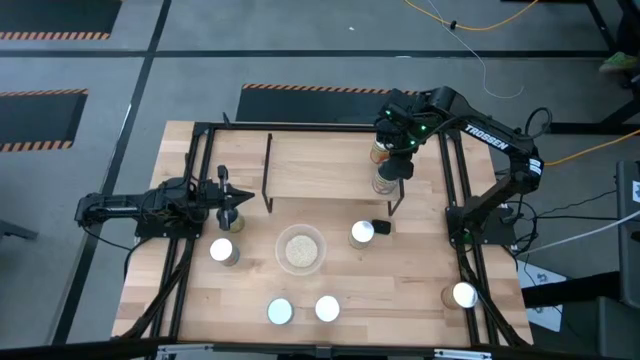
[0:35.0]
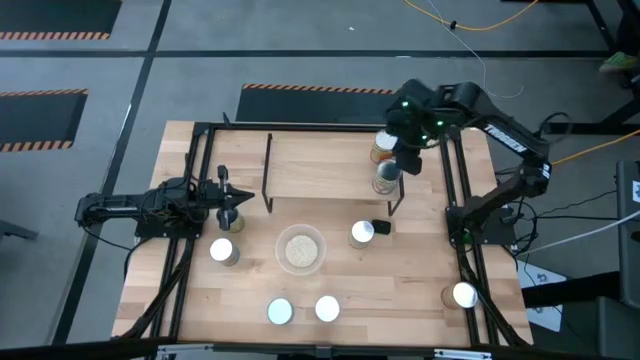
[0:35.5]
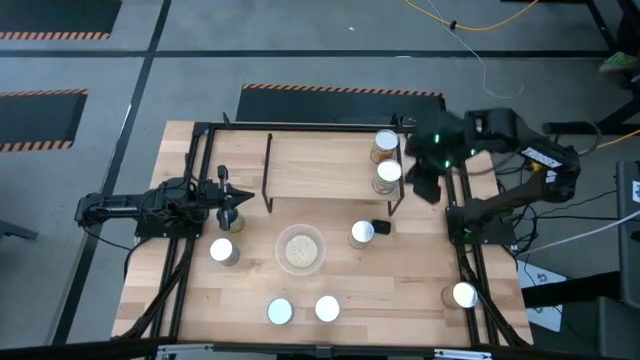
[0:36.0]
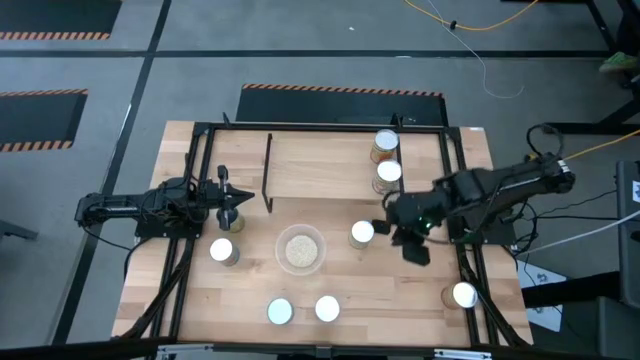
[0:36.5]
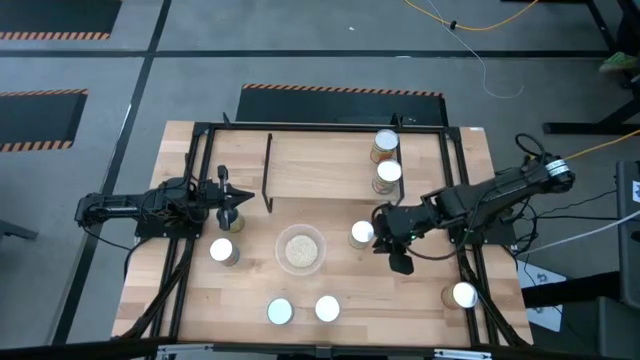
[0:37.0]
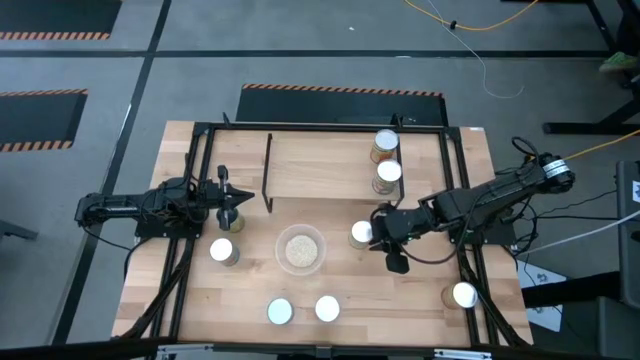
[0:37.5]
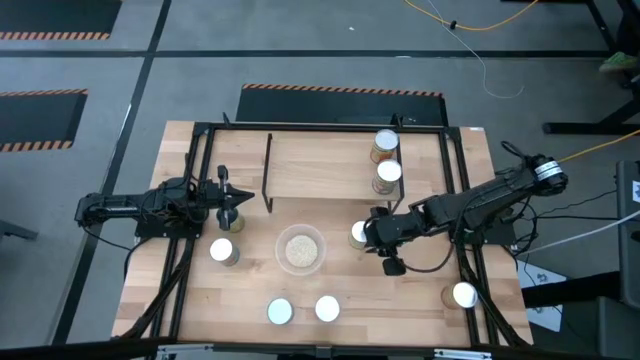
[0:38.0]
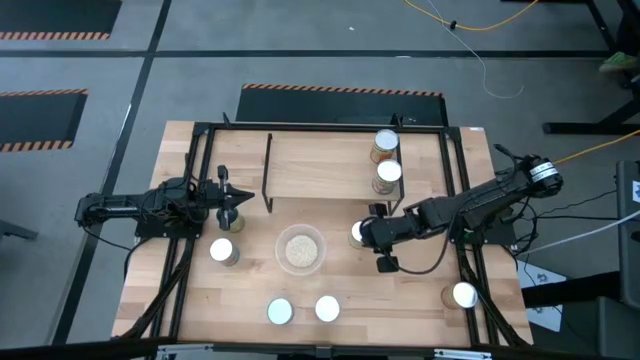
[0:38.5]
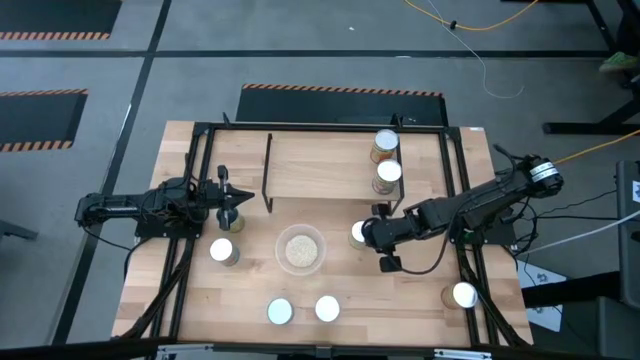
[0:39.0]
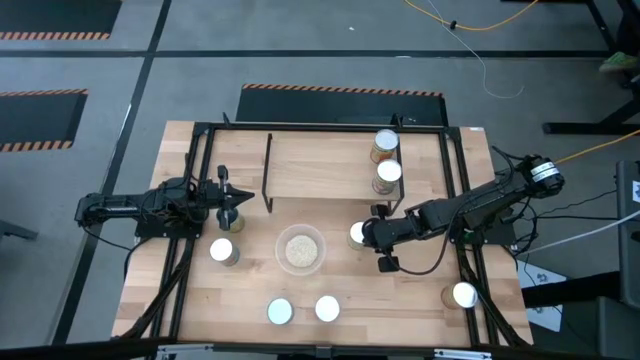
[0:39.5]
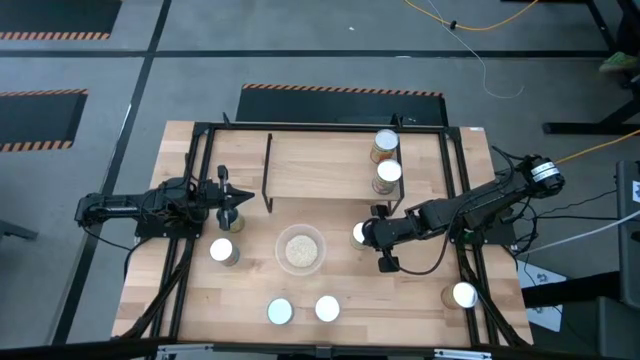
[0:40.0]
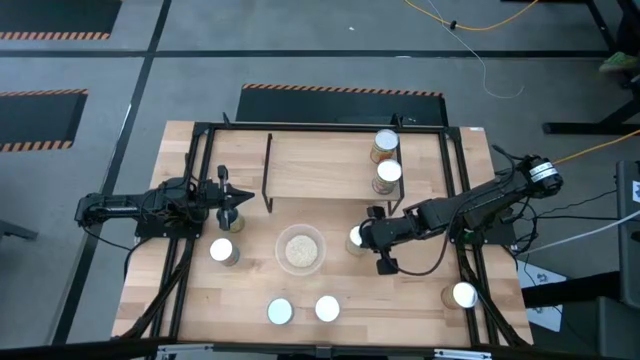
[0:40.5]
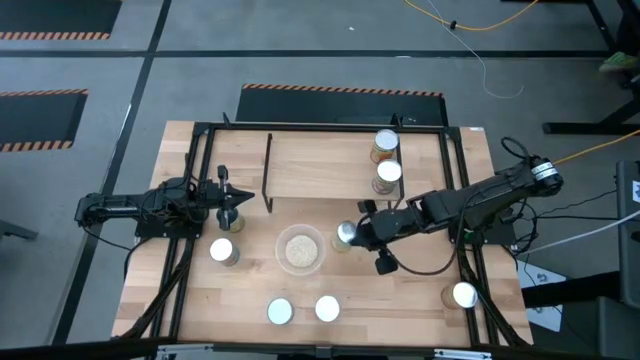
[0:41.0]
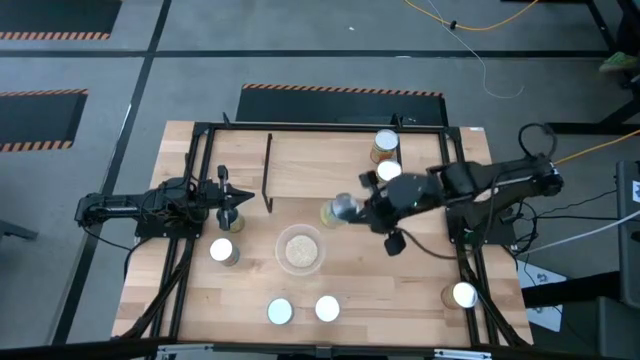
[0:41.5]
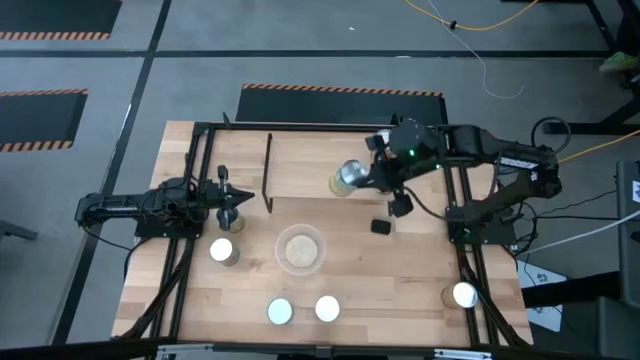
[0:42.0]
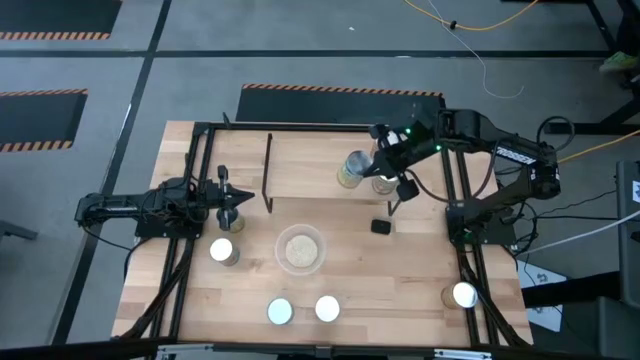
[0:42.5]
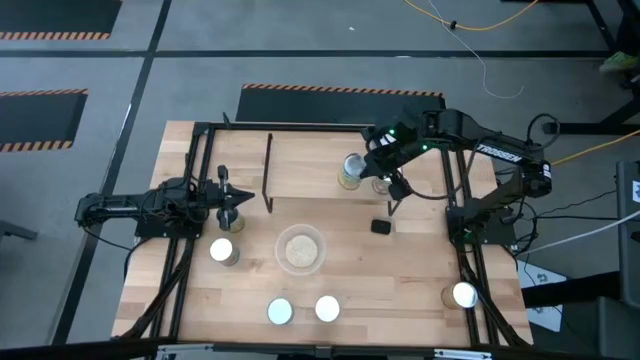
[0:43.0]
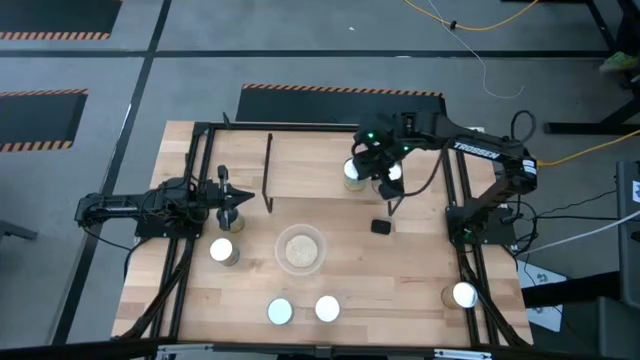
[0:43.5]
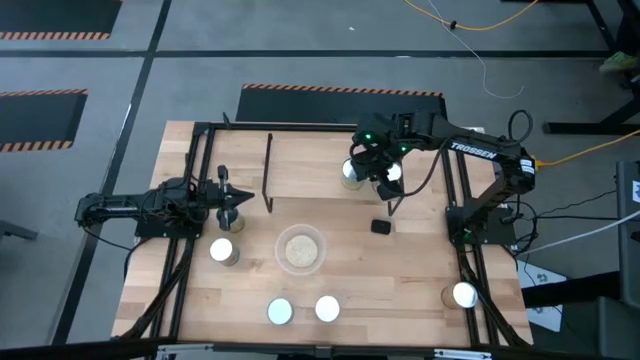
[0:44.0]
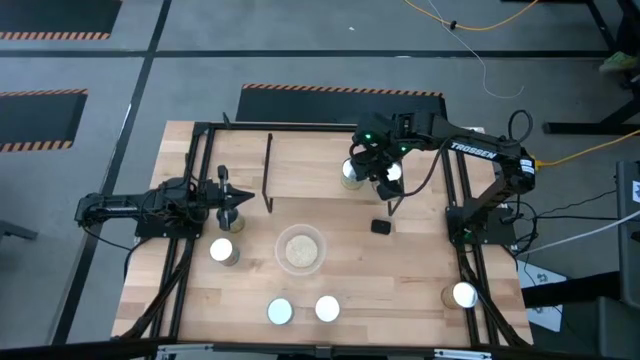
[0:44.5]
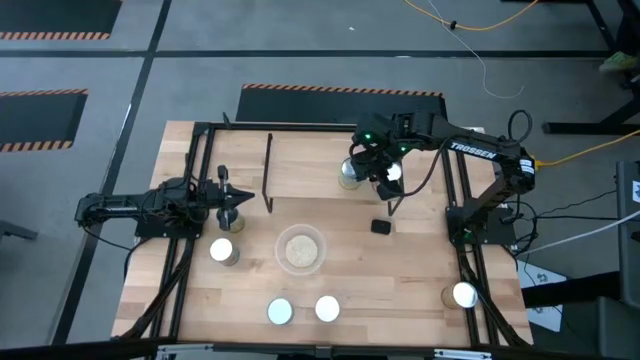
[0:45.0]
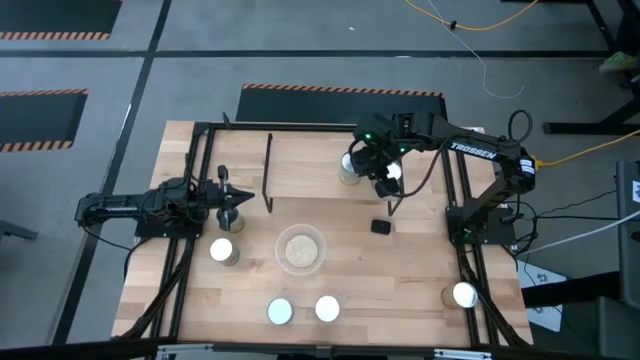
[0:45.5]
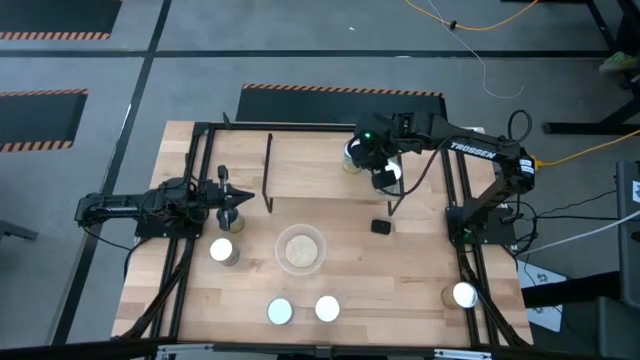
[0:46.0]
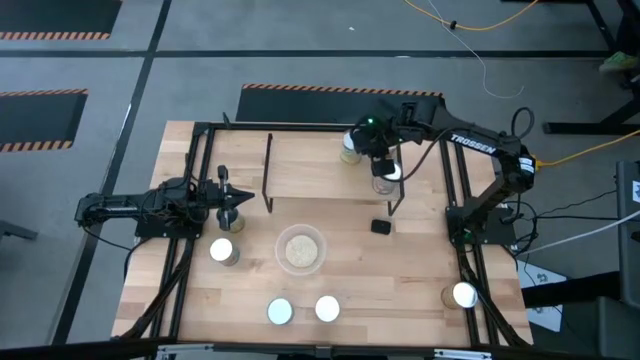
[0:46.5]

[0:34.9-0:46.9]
Task: Pick and place cans onto a shelf
Put the canned carrots on the shelf

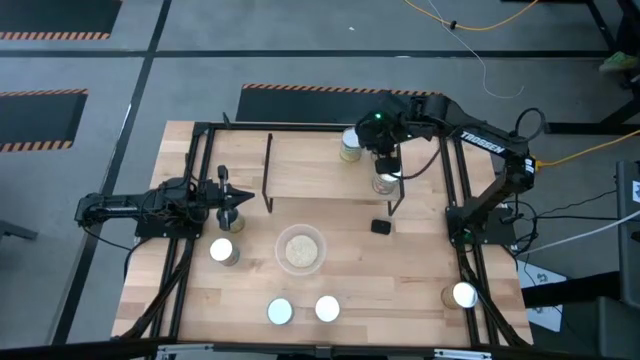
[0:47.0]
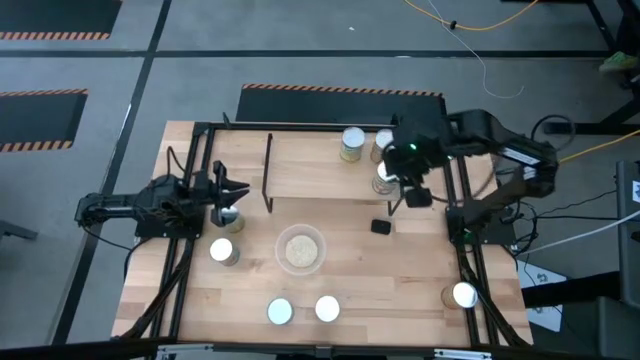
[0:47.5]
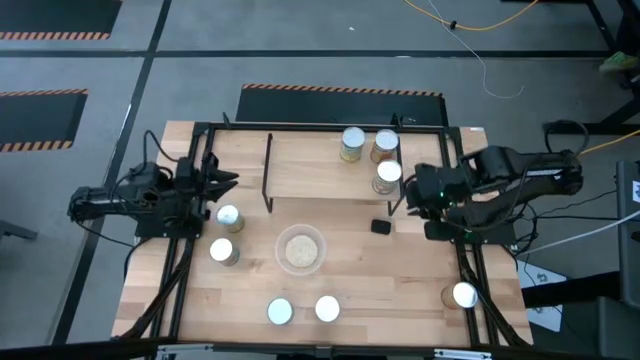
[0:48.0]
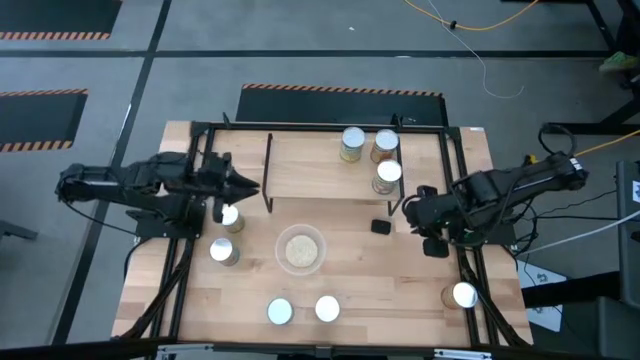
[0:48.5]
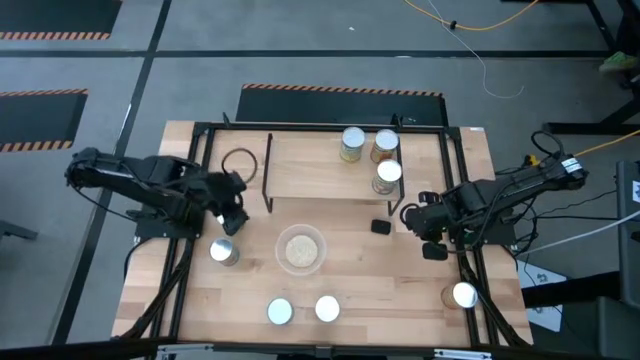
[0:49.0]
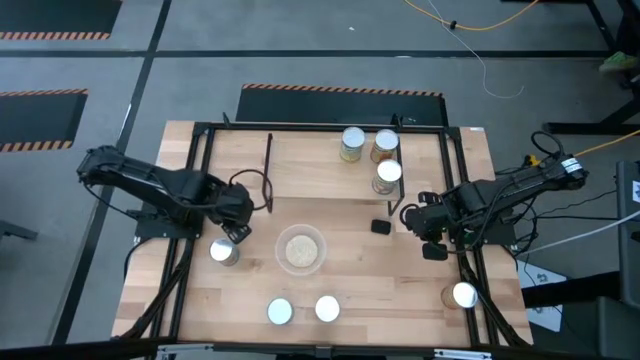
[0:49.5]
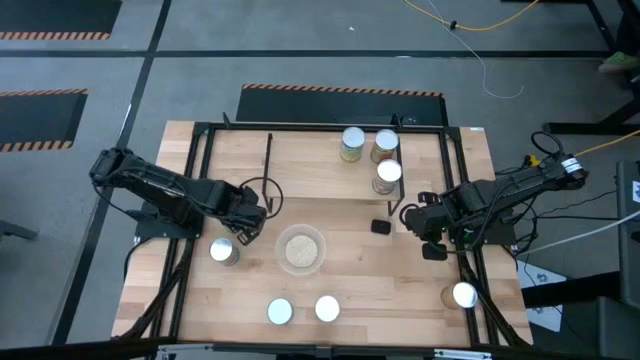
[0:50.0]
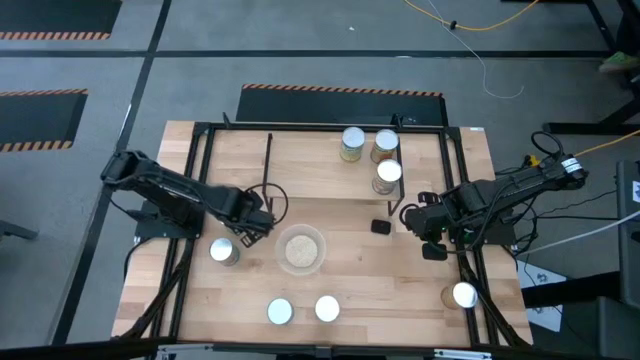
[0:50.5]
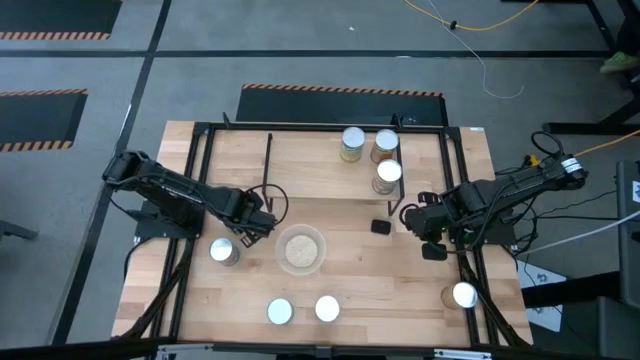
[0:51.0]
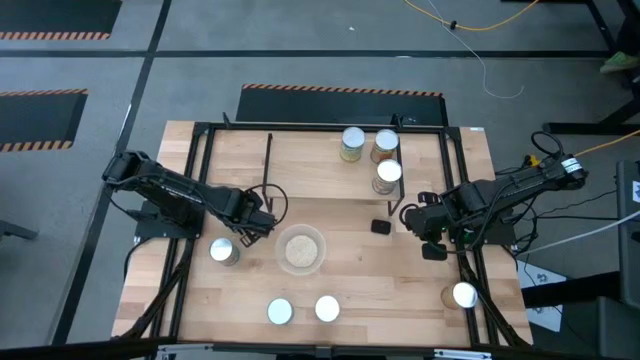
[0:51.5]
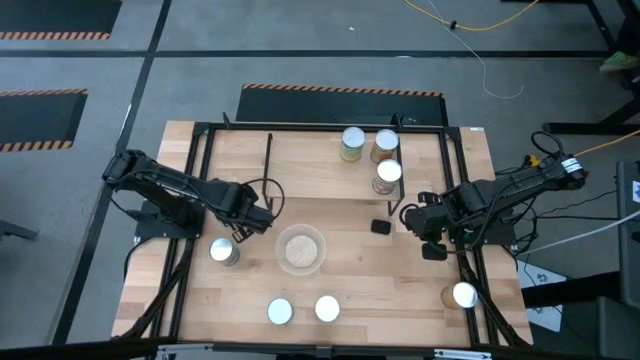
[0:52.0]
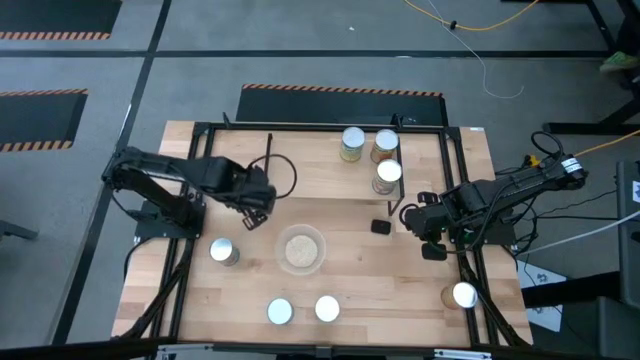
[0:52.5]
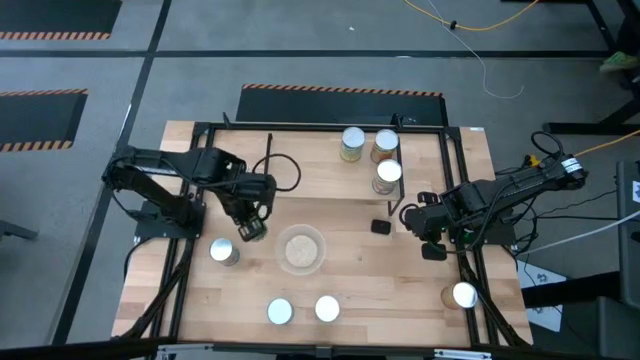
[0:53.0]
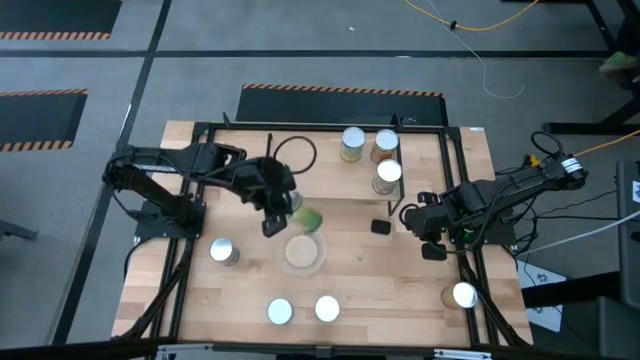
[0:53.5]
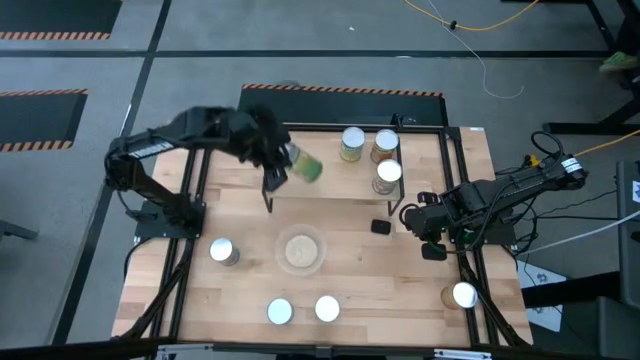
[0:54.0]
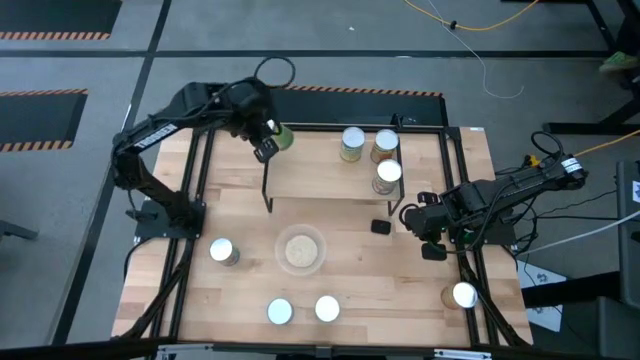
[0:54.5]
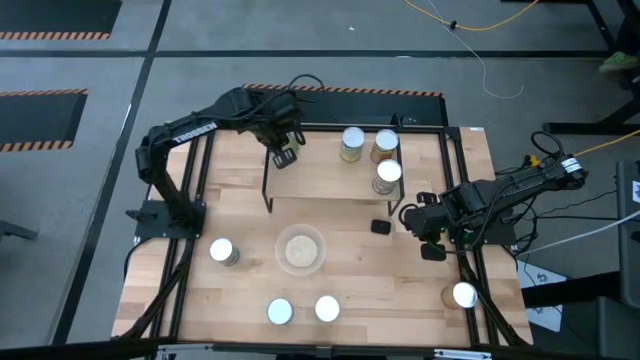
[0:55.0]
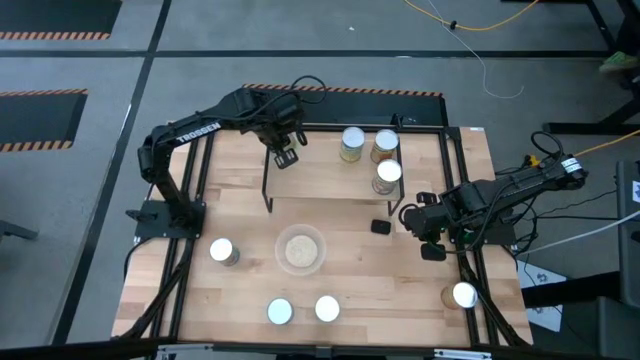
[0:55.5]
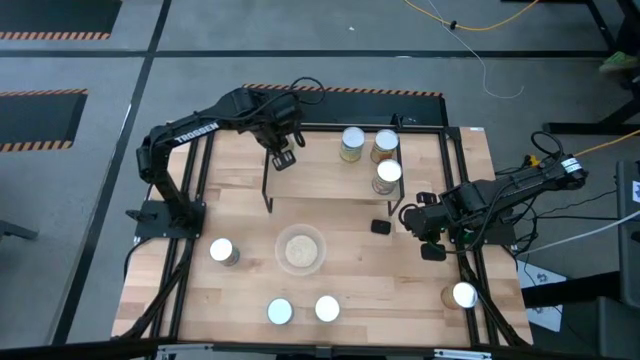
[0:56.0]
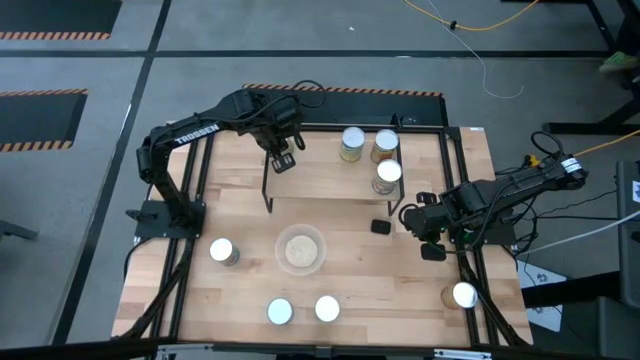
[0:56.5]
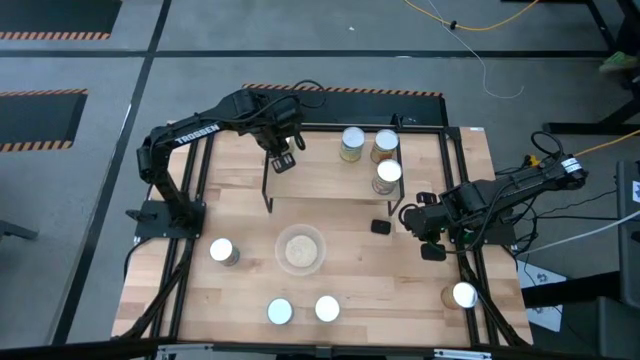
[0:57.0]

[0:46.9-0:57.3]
Put the canned oranges on the shelf
